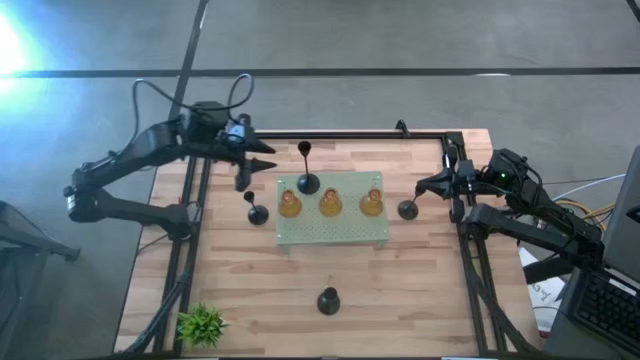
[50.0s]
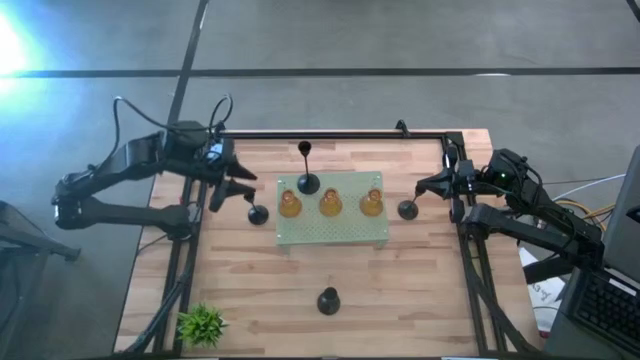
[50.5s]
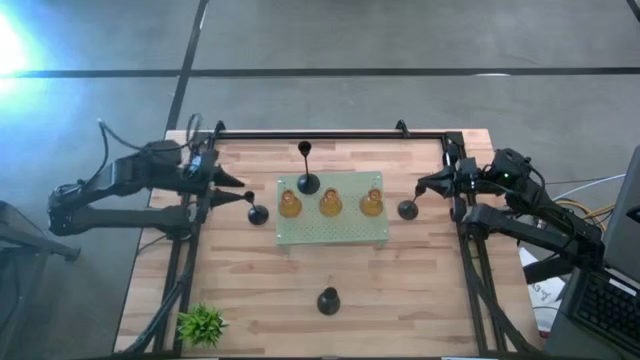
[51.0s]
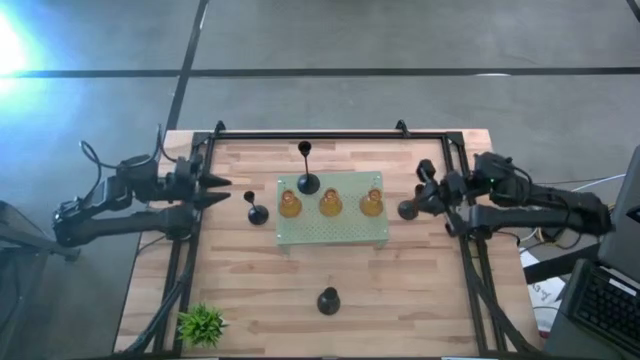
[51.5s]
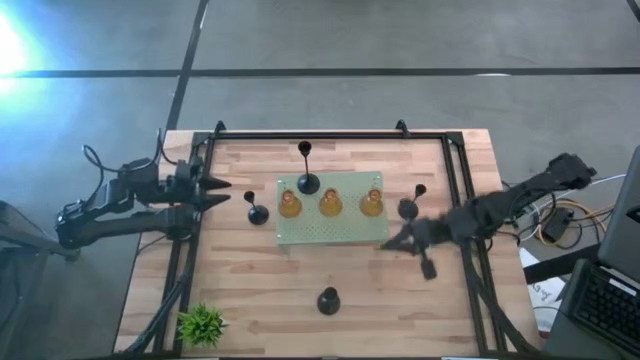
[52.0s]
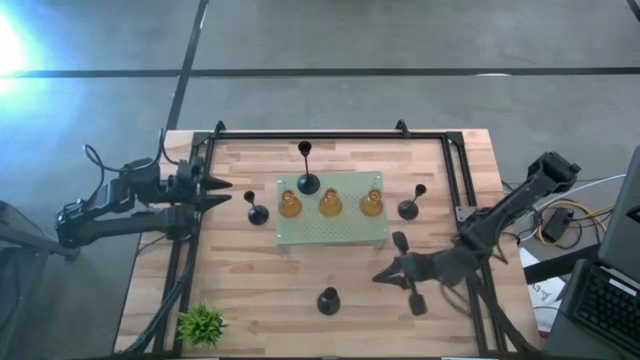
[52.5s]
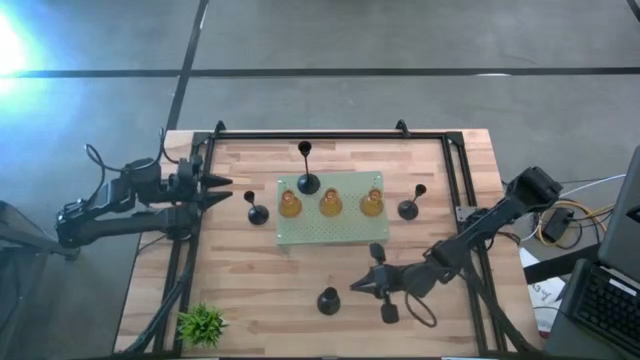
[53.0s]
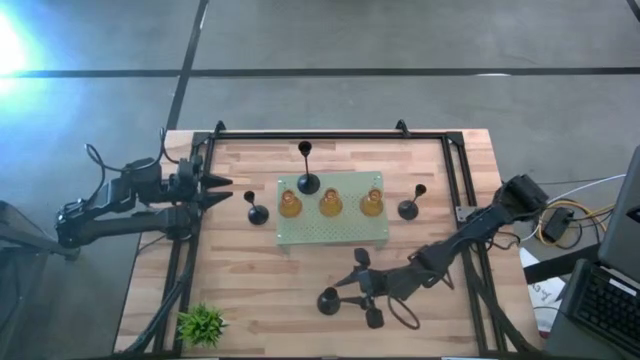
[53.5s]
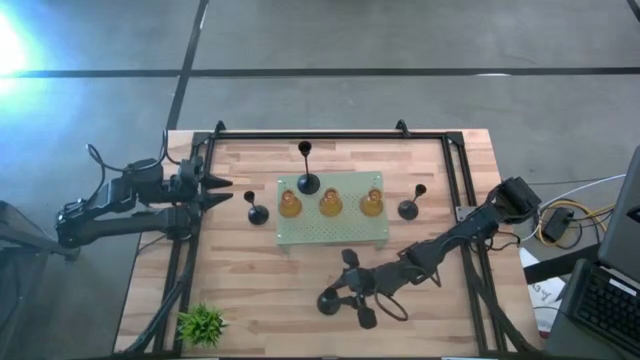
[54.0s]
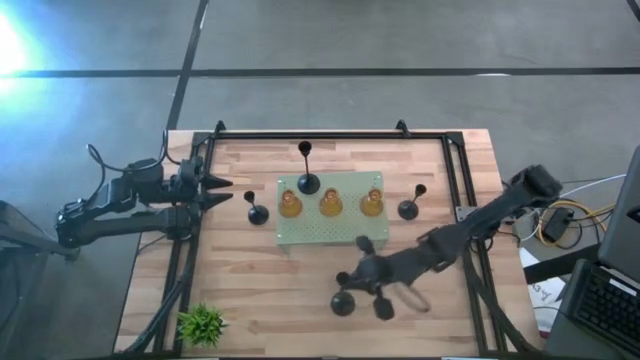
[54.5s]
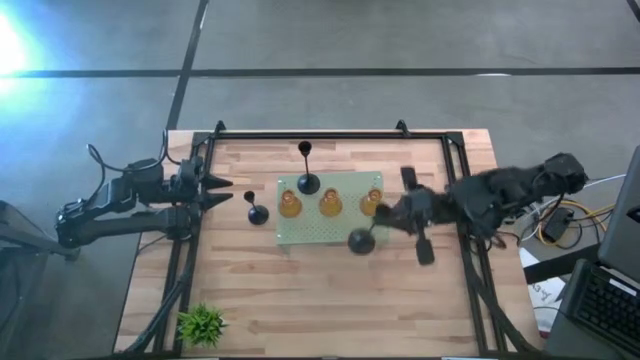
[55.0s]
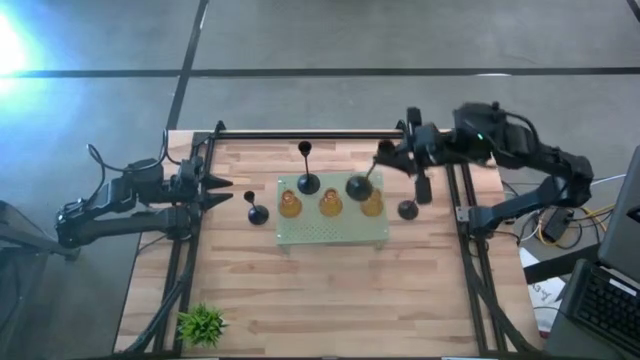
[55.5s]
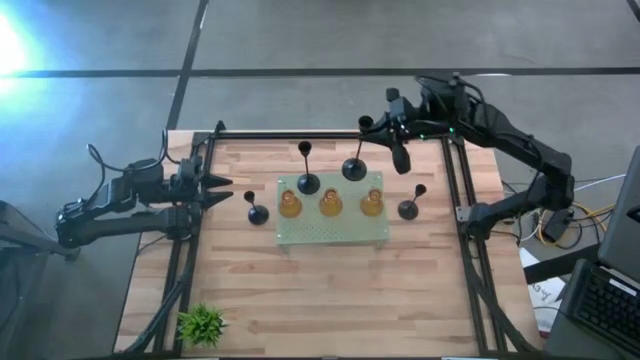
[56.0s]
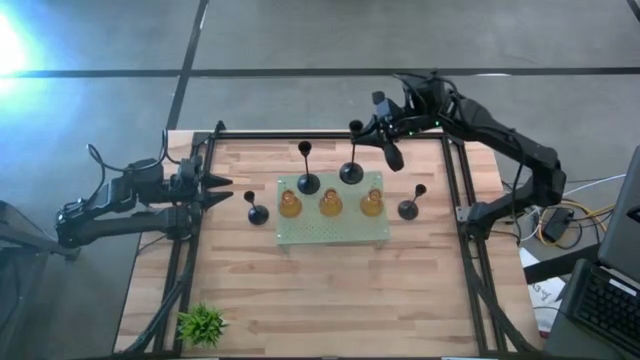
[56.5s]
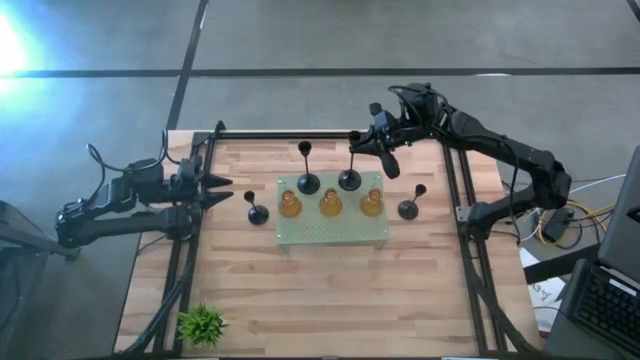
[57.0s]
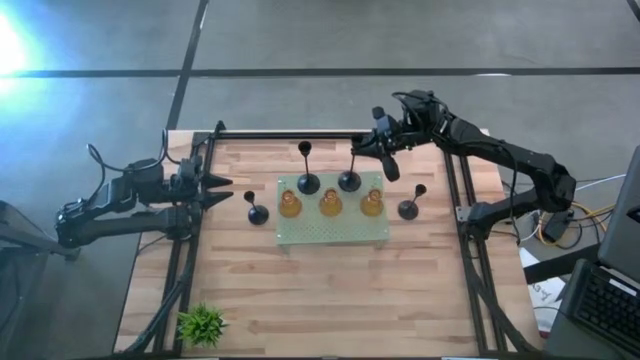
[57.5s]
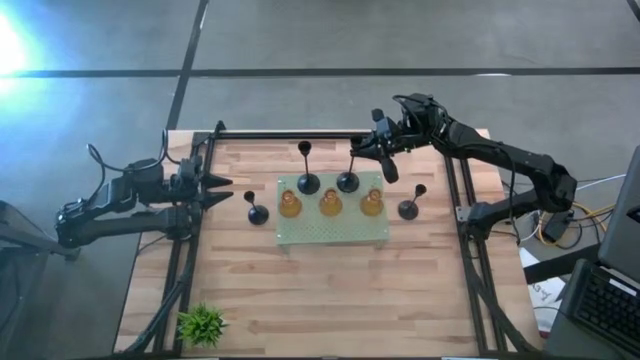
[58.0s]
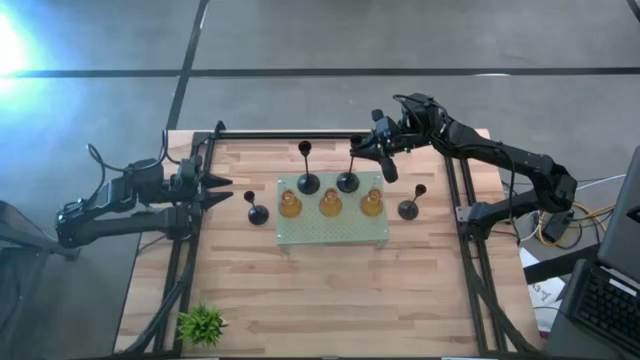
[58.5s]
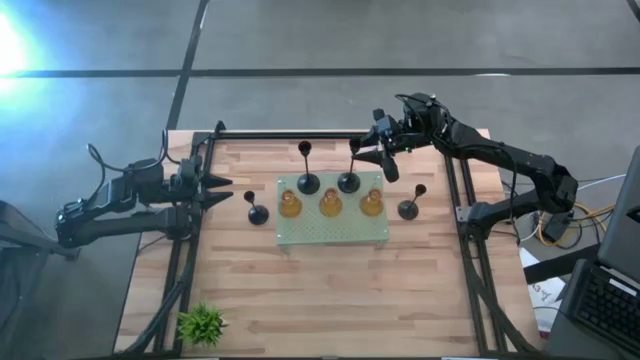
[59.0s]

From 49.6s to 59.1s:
Task: Pick & Place candle stick holders
Put the black candle holder on the shelf

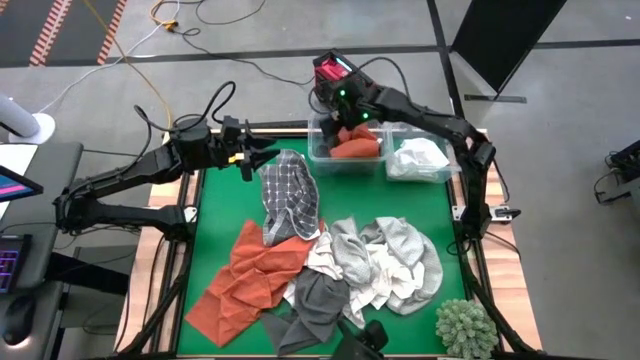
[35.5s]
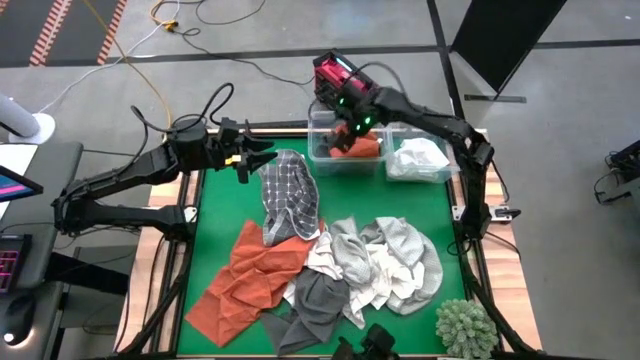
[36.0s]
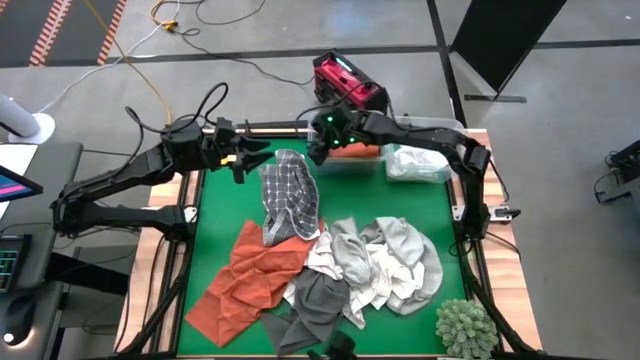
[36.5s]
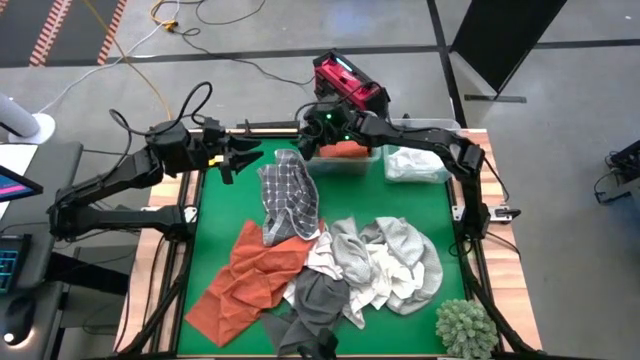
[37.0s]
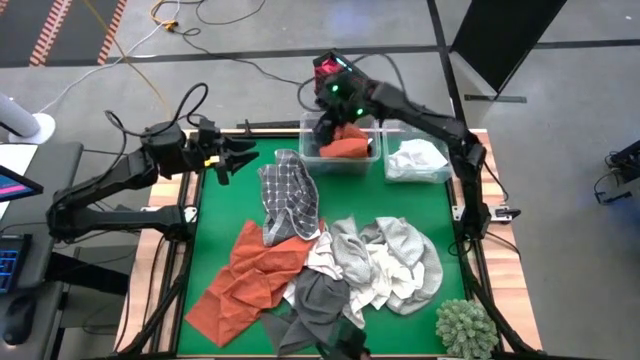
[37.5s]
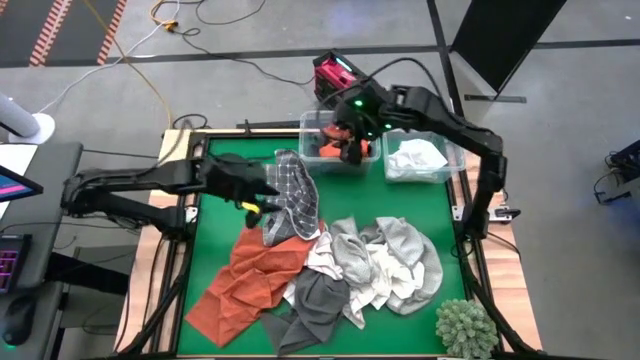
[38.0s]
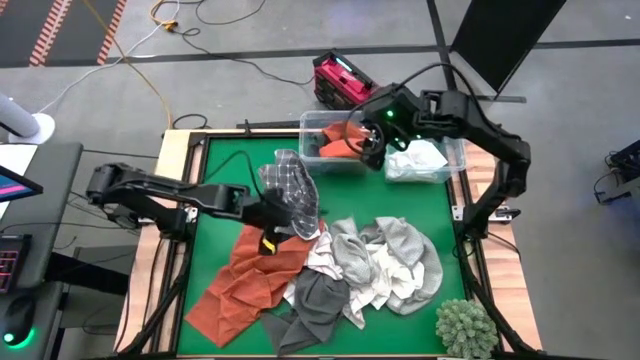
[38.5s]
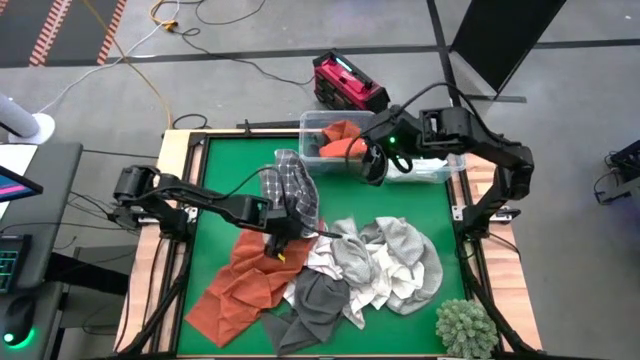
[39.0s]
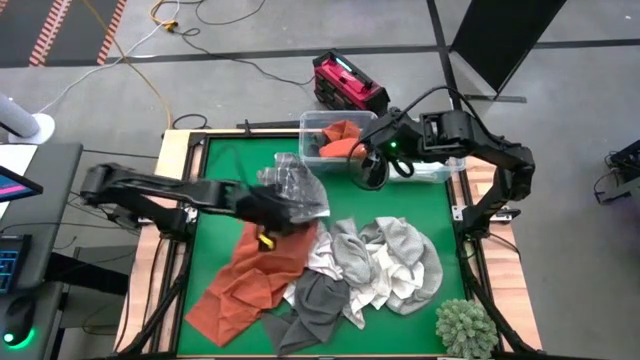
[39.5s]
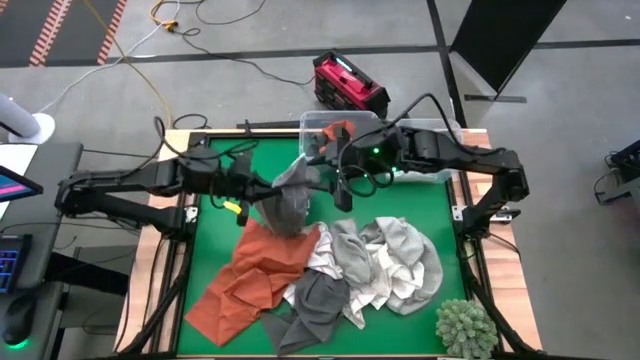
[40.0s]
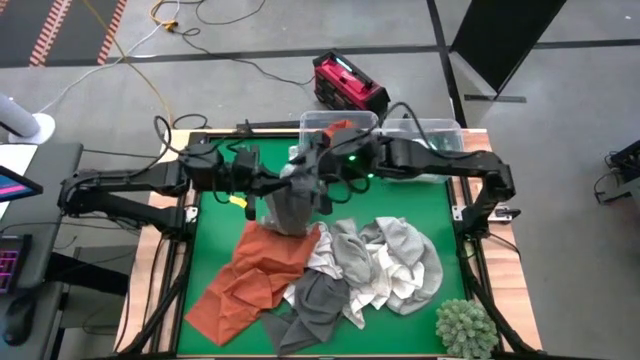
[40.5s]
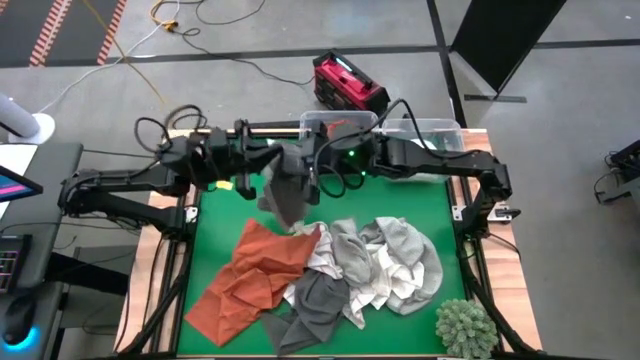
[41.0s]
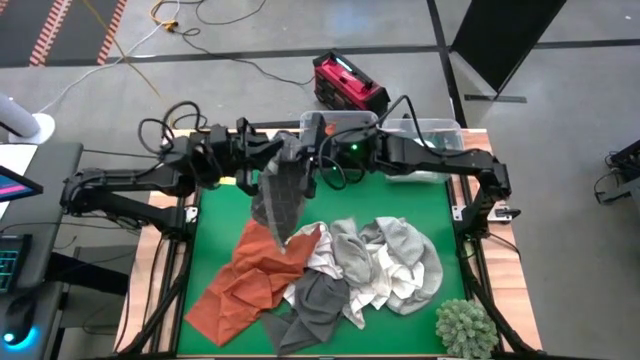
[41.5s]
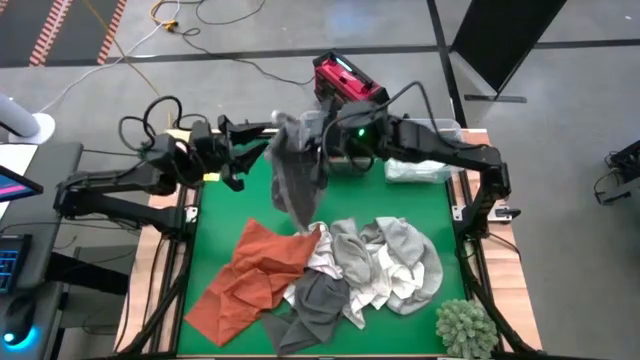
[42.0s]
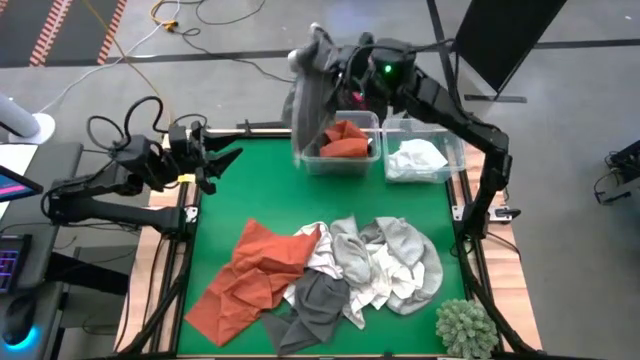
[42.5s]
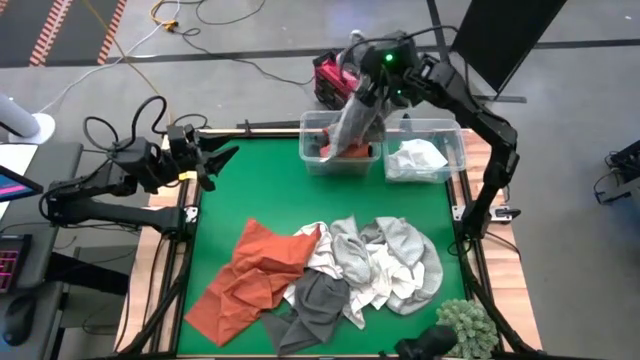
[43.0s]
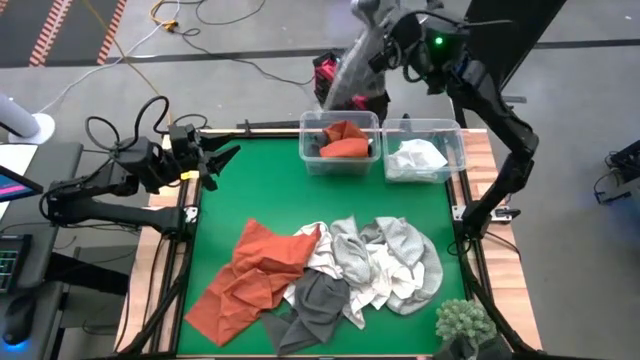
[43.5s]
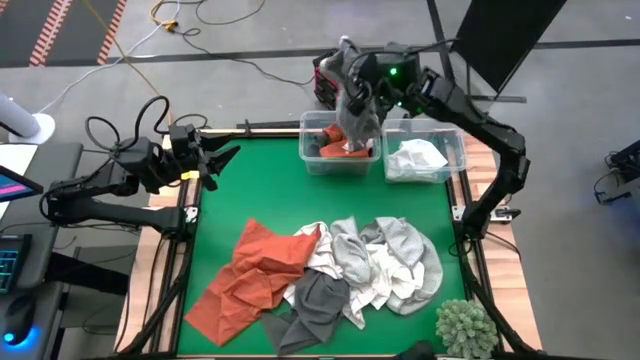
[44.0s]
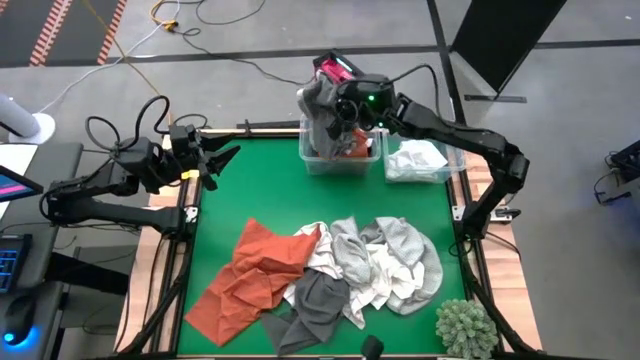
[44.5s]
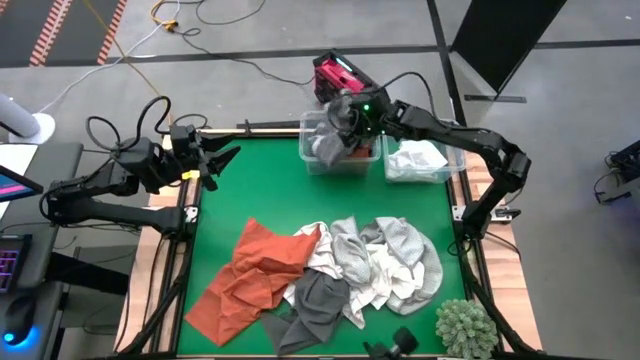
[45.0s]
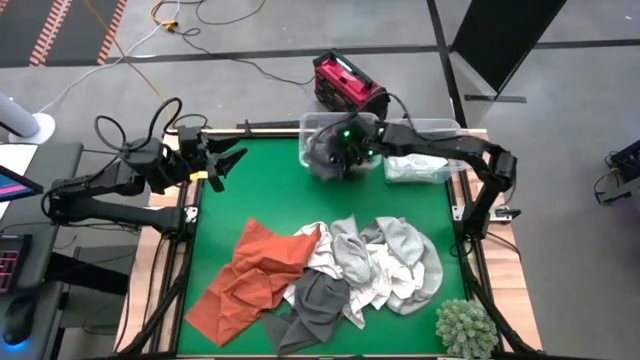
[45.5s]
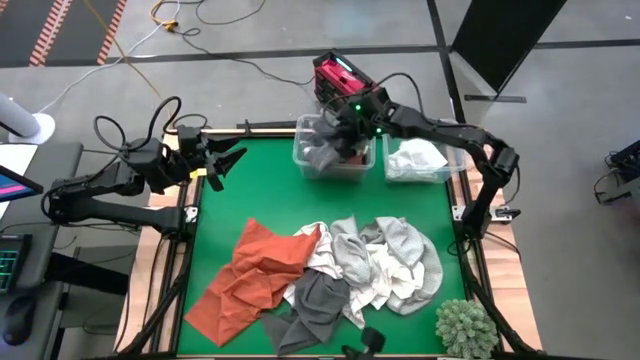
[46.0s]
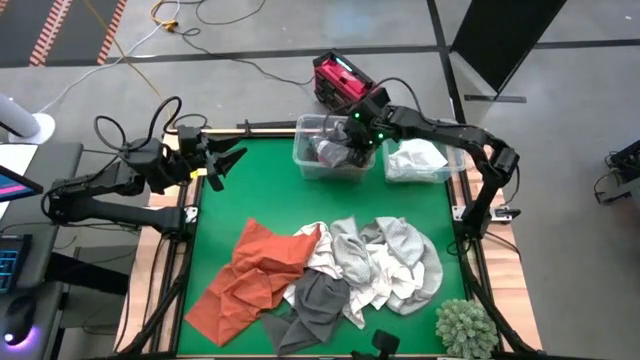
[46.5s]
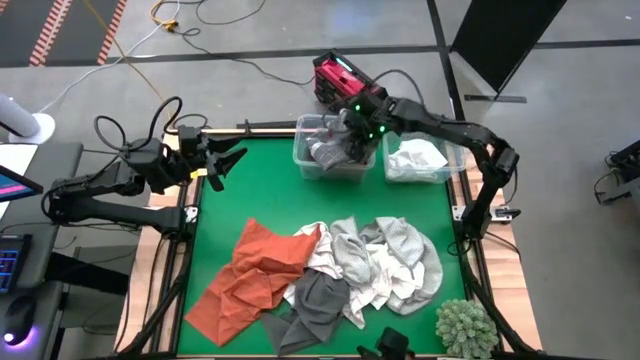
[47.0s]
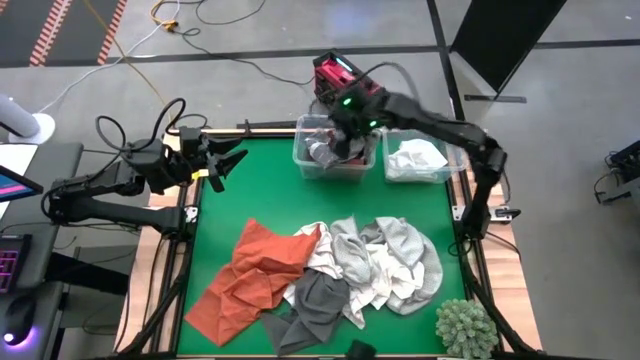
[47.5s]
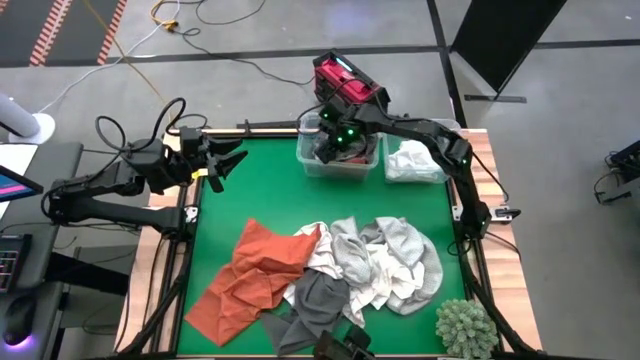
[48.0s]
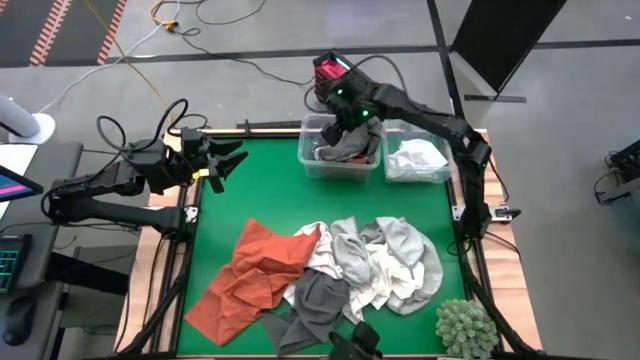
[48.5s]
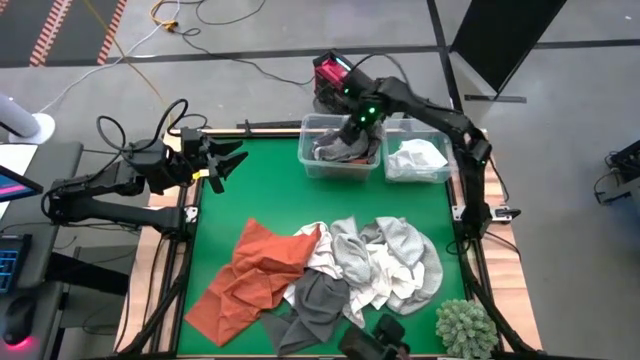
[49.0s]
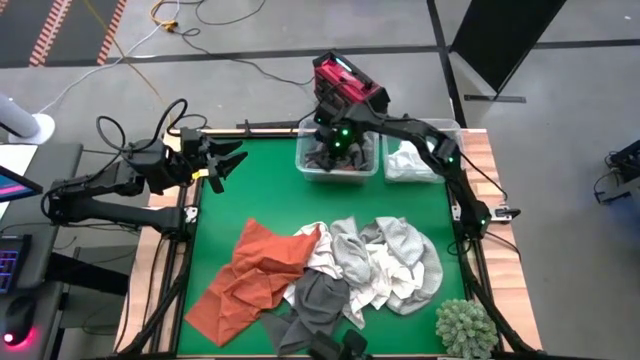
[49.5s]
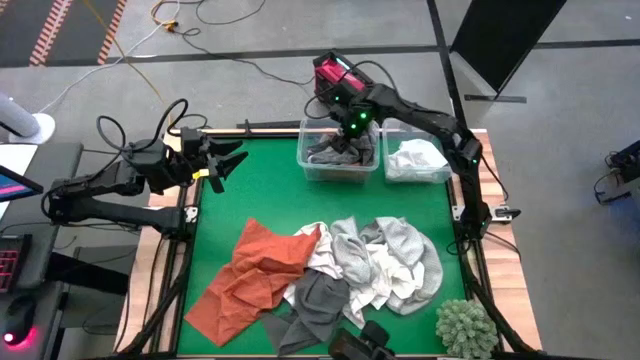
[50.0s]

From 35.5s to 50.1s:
Task: Sort towels by color in basket
Put the gray-white towel into the left transparent bin
